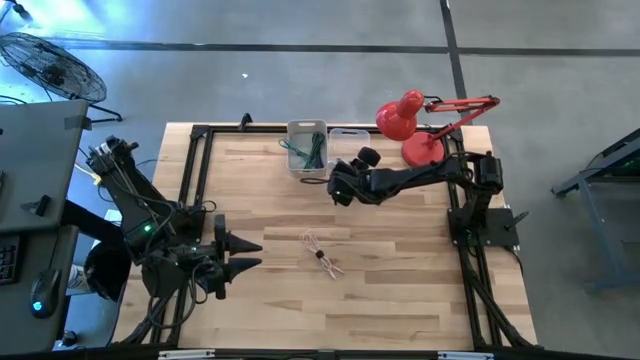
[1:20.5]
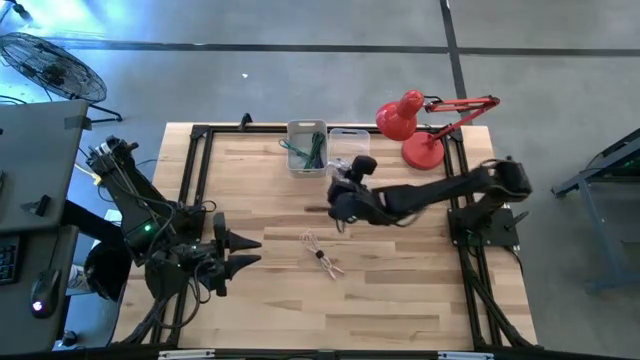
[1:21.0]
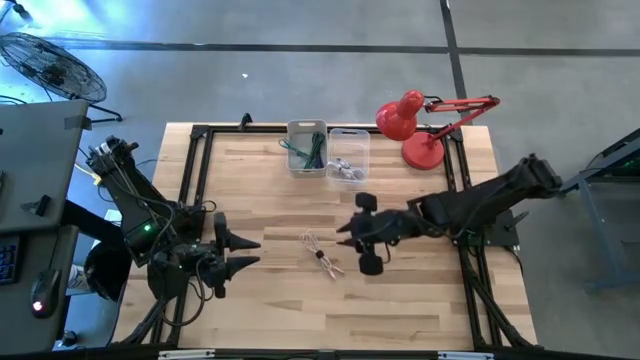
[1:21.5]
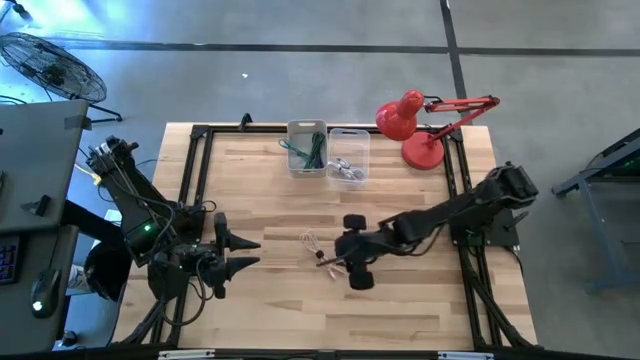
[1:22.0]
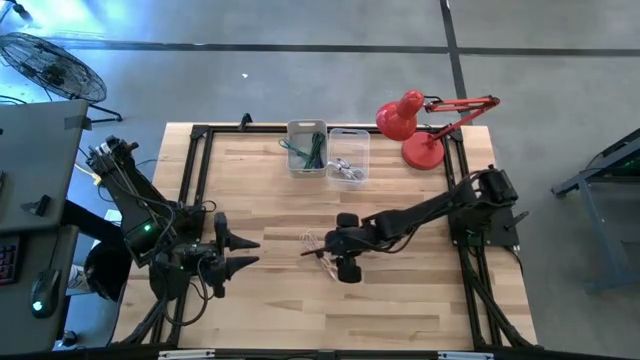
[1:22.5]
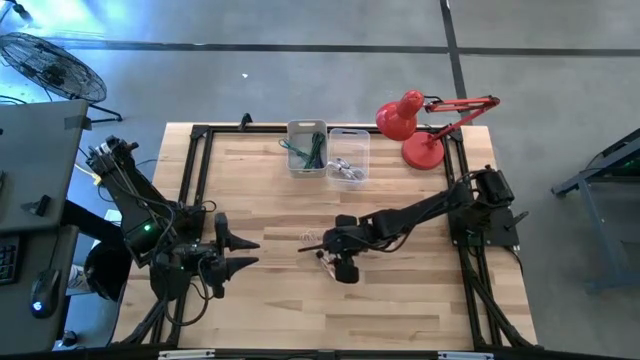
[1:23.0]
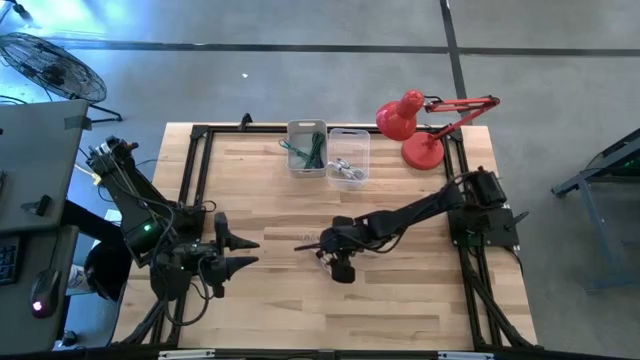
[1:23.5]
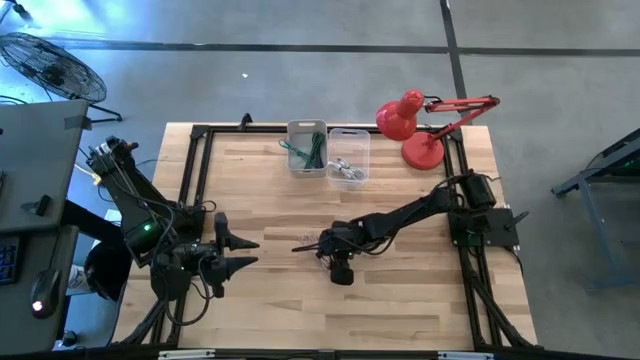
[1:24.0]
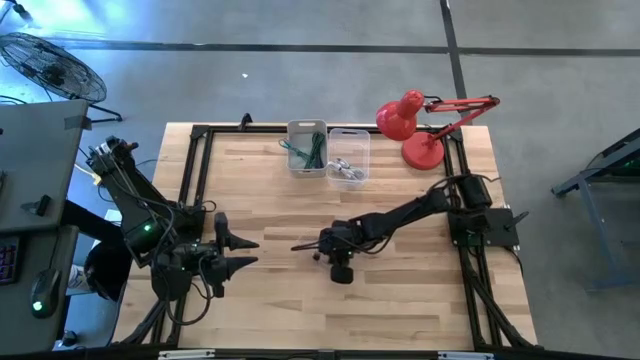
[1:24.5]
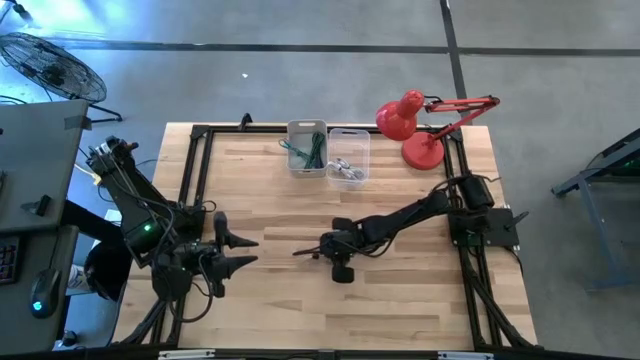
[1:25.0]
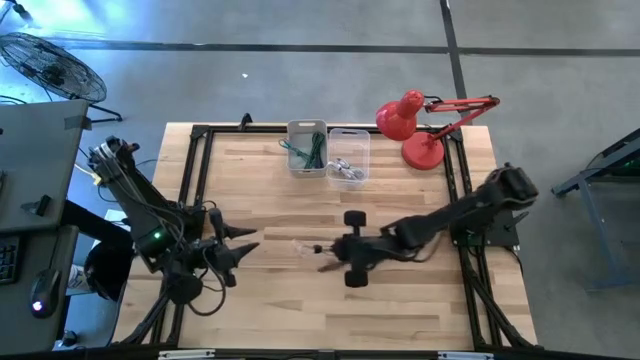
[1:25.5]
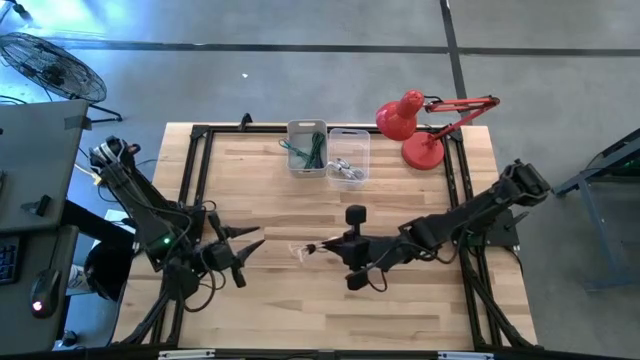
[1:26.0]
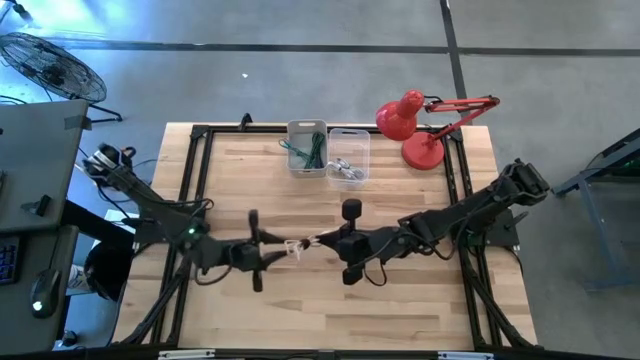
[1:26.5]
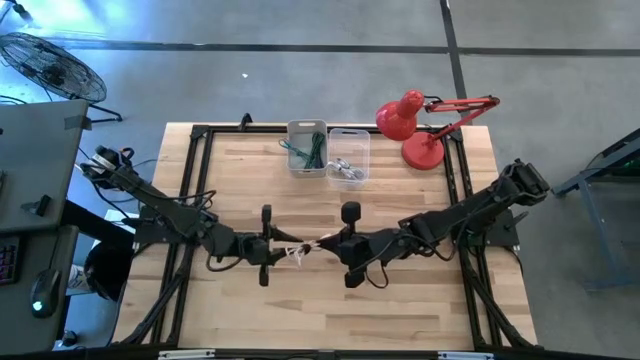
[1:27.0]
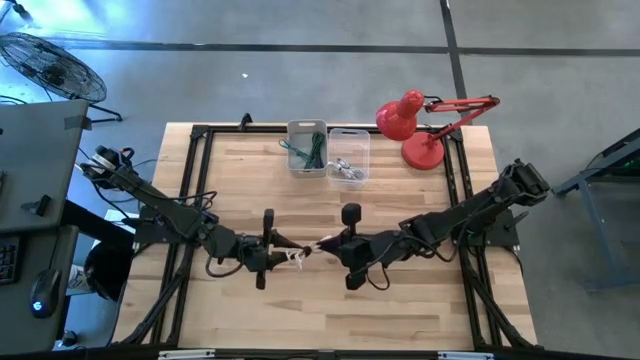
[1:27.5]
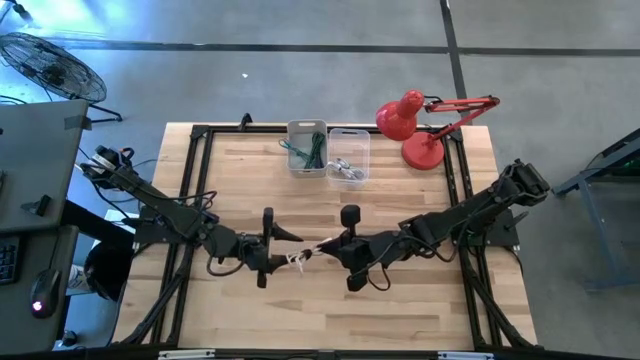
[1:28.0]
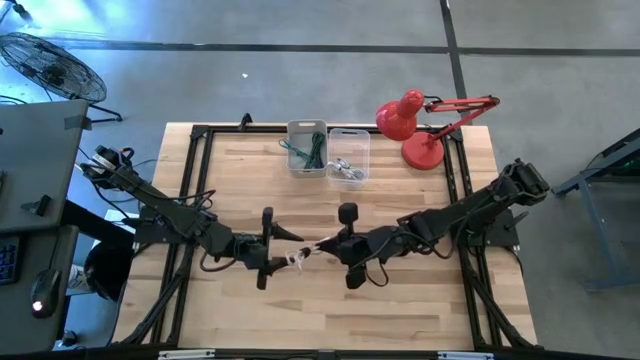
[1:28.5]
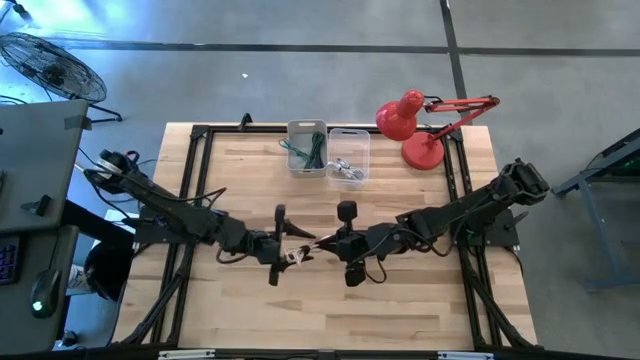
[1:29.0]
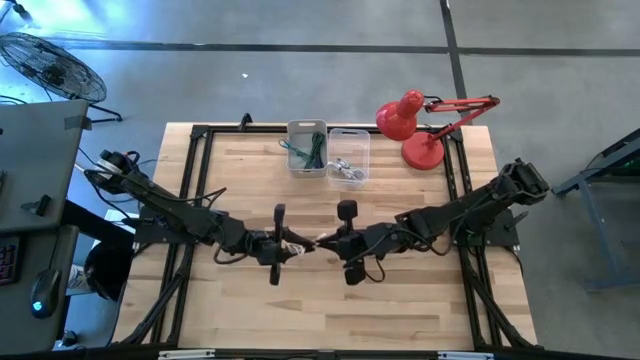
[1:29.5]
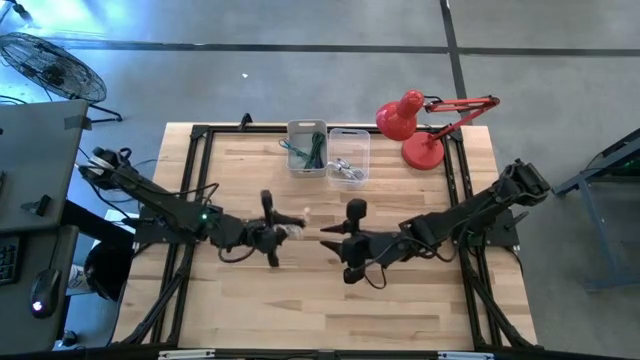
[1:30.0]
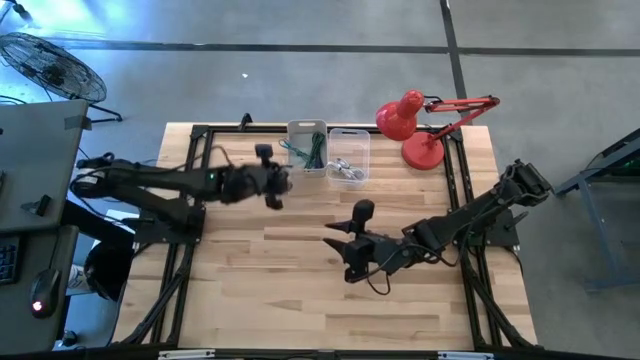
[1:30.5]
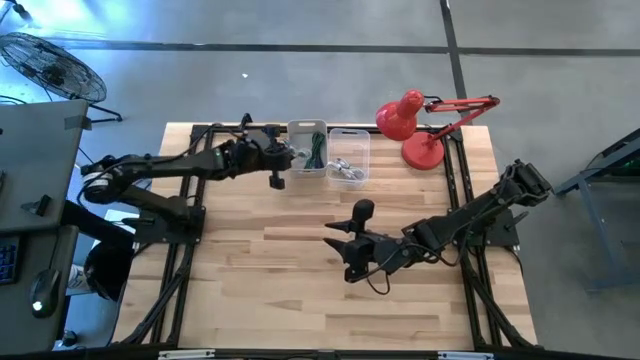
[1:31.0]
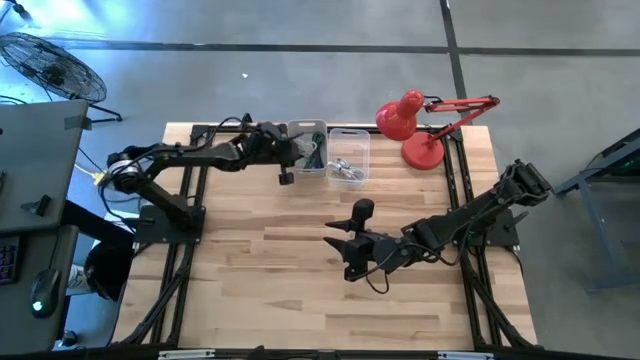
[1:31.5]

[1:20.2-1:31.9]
Task: Pick & Place USB Port
Put the orange patterned charger cable into the gray bin

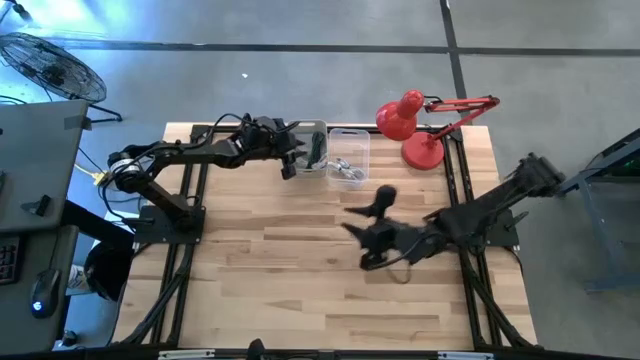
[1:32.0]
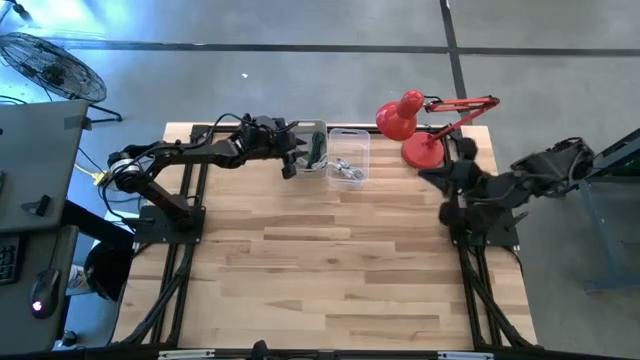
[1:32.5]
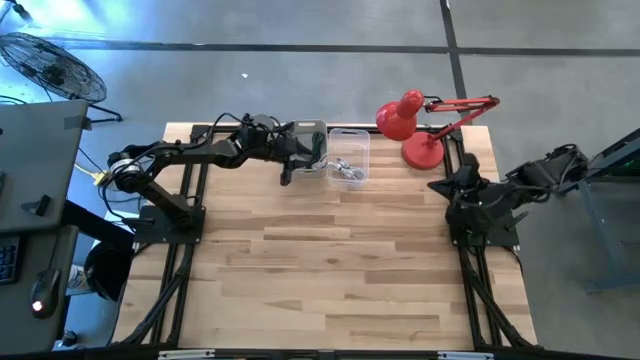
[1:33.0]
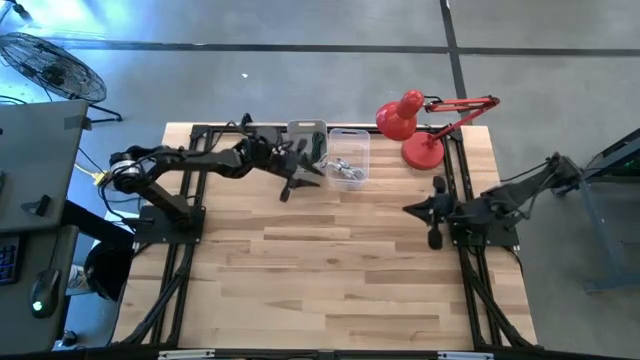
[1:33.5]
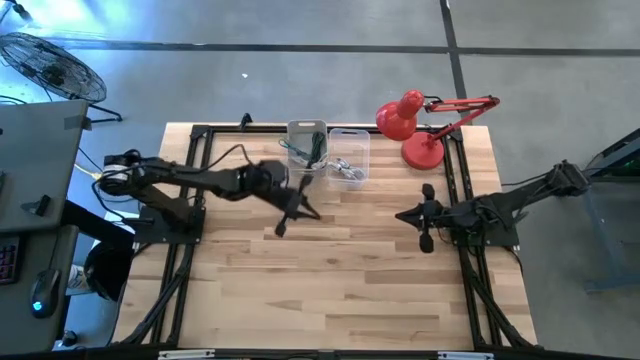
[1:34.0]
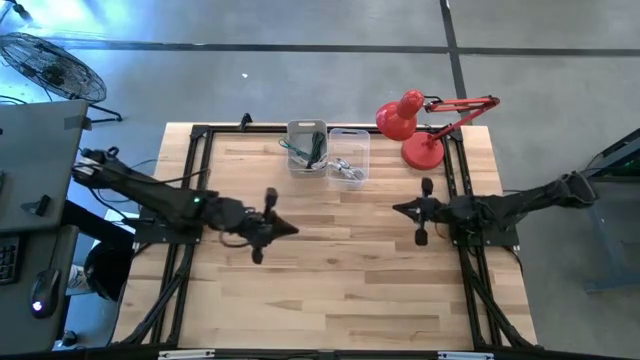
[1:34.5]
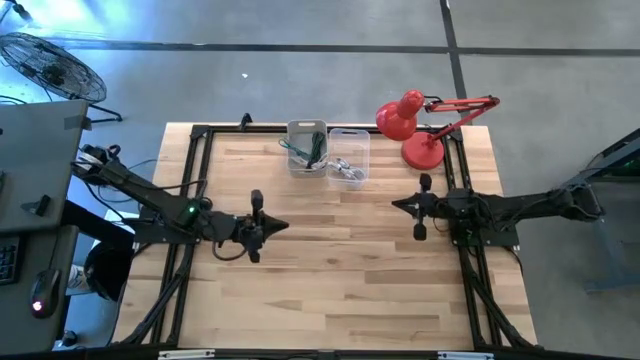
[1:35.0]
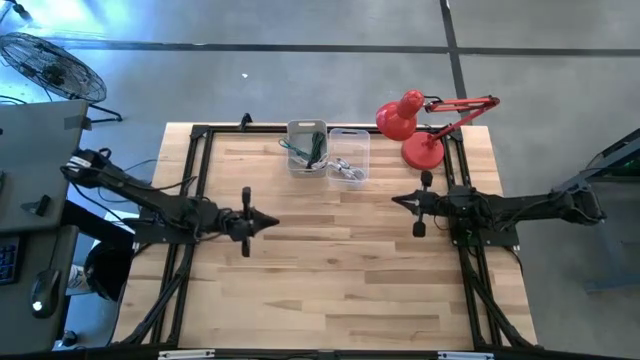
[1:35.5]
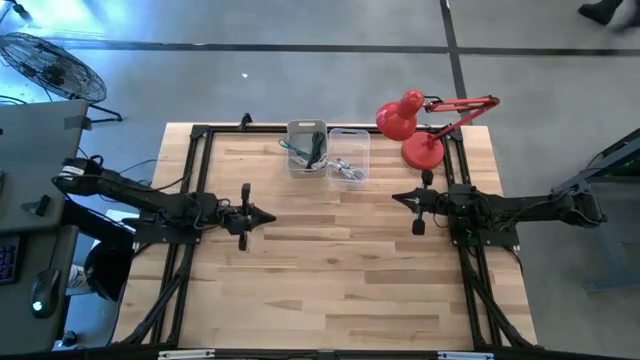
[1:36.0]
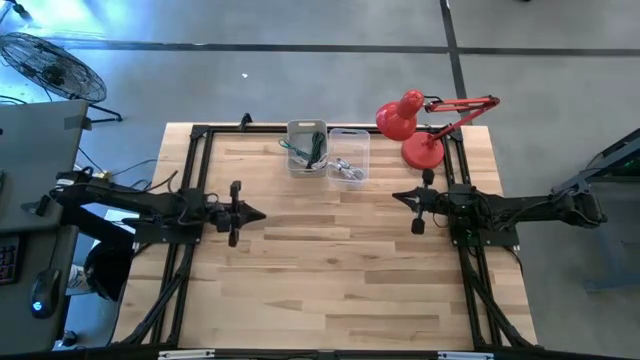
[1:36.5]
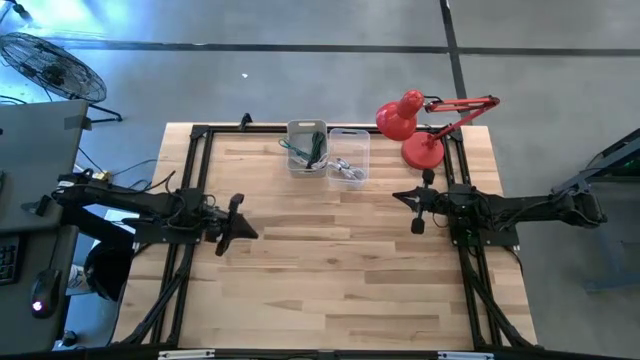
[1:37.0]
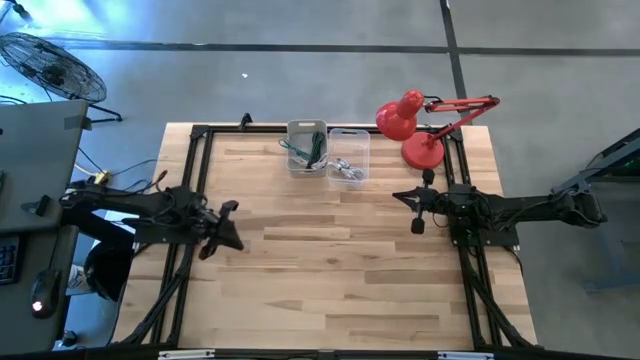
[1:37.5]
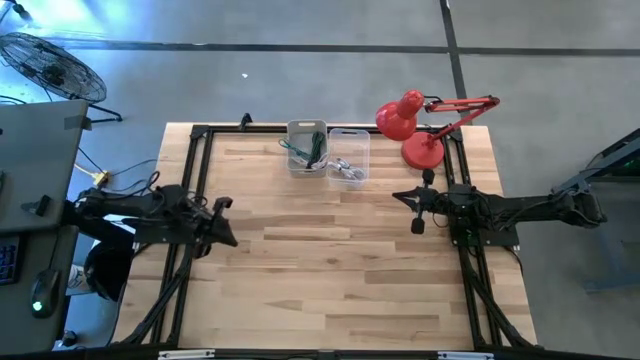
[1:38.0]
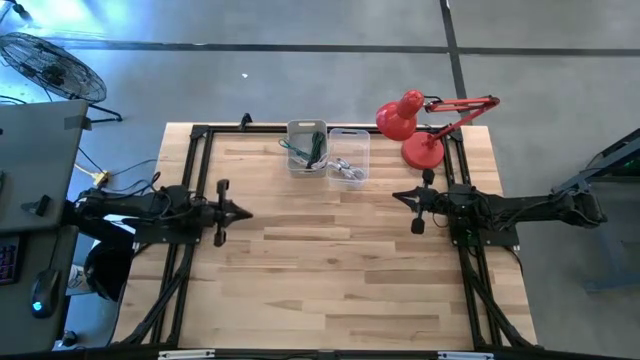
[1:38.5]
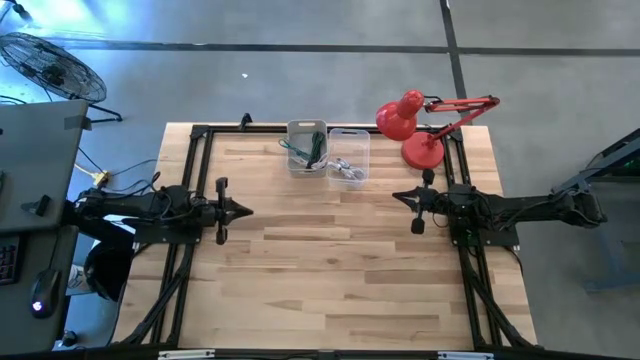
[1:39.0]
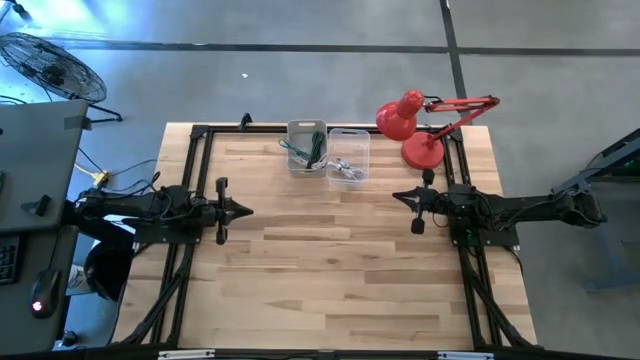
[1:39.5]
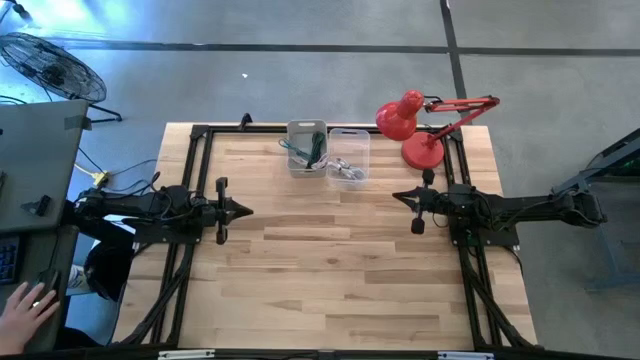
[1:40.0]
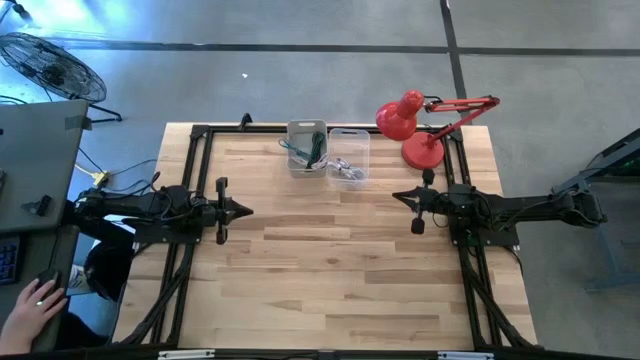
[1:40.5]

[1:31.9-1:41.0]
Return to Home Position

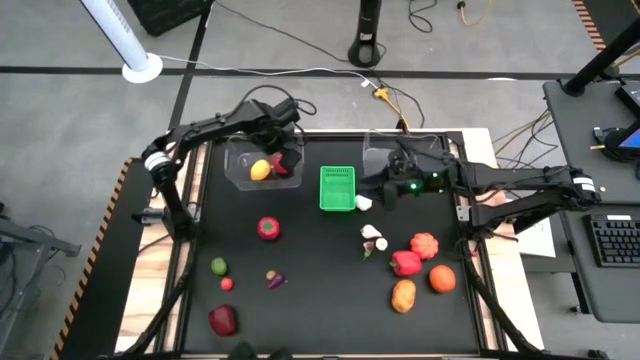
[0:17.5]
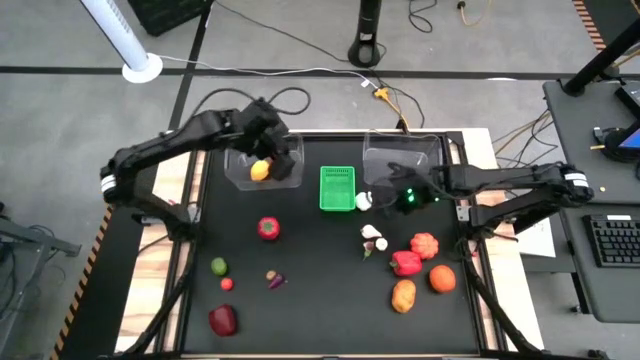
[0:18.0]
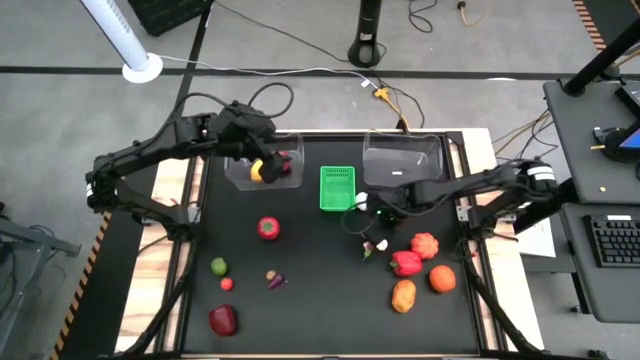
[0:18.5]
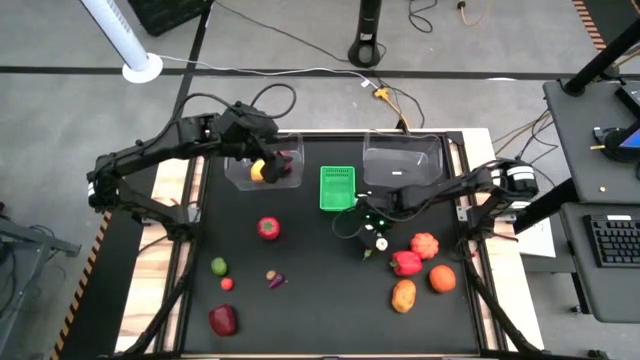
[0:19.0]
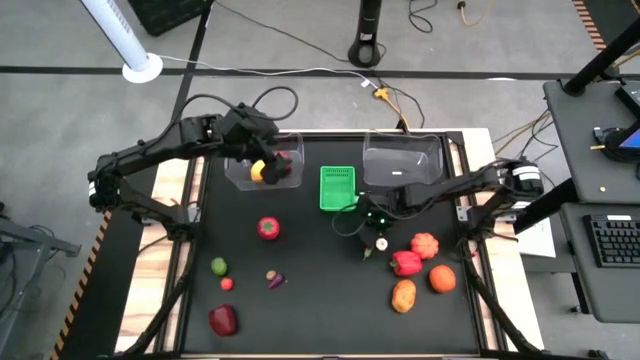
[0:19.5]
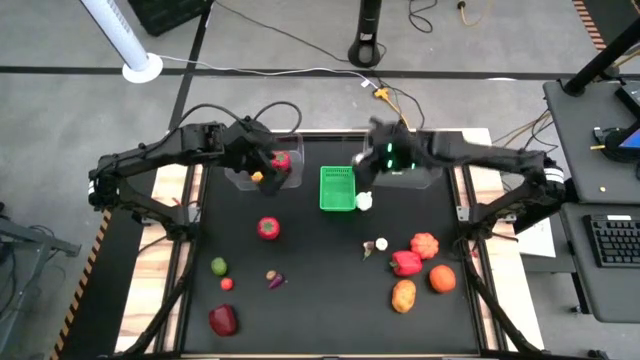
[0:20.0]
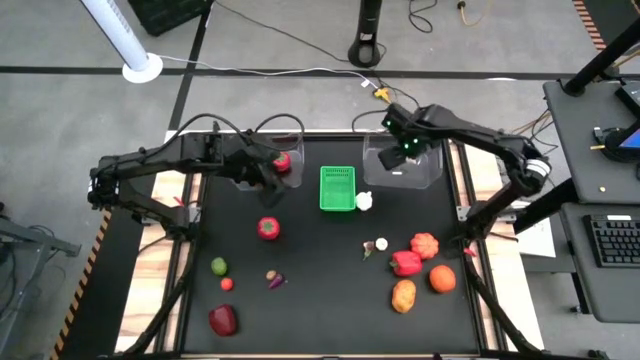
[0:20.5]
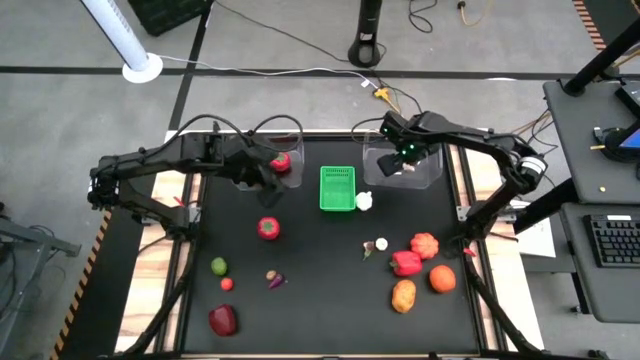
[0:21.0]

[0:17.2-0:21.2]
Task: Sort produce into baskets
Put the middle garlic into the right transparent bin
